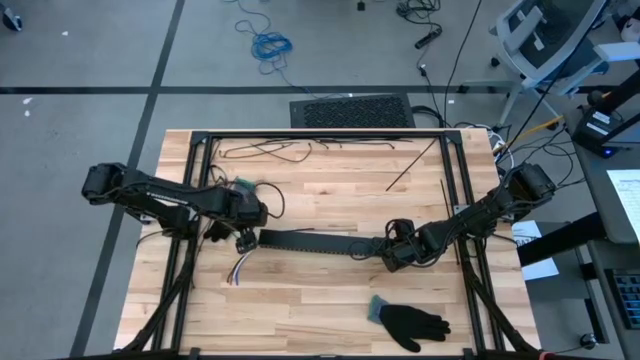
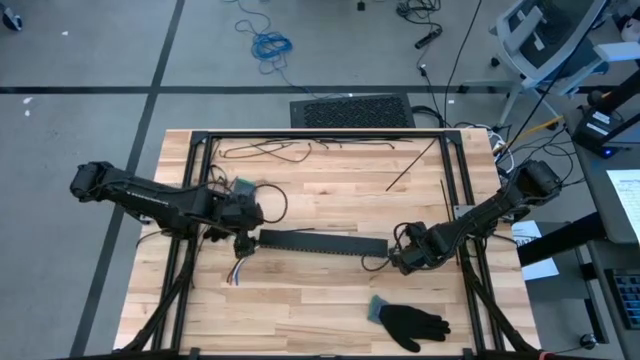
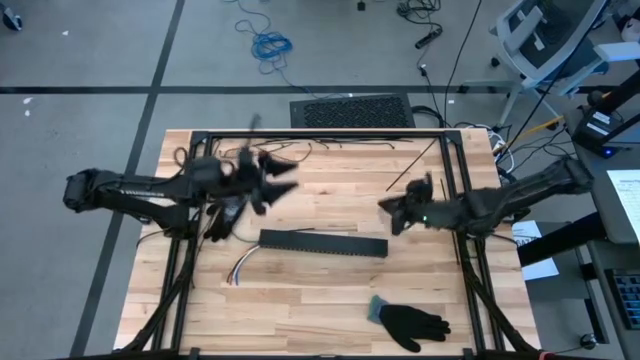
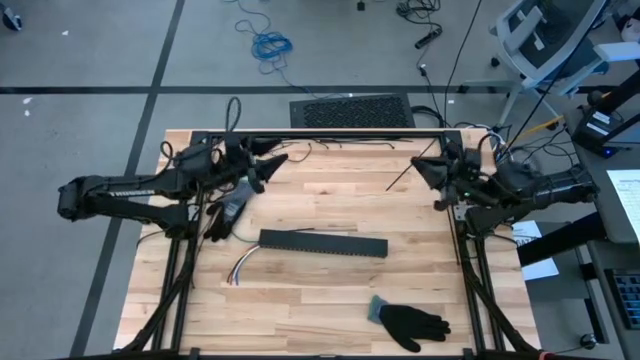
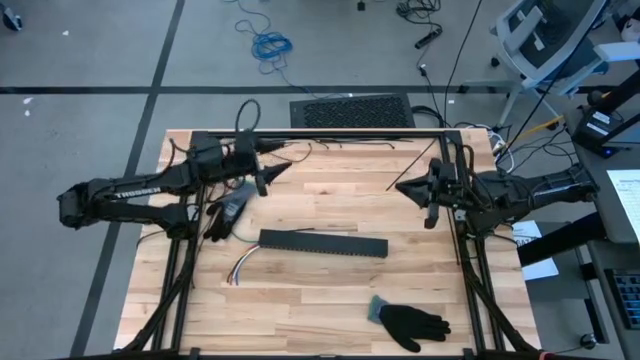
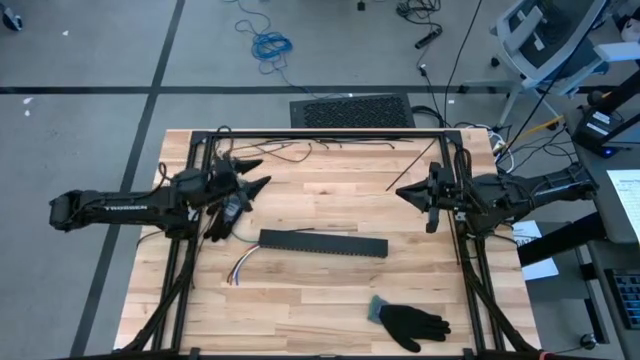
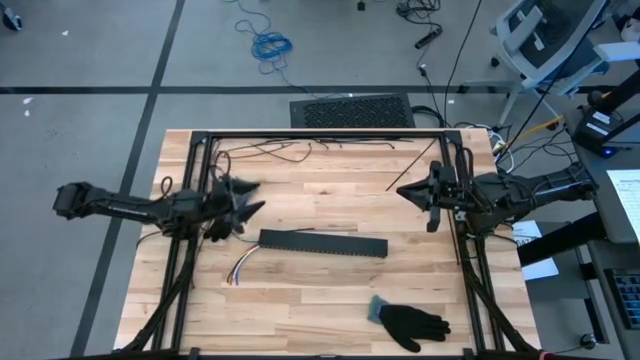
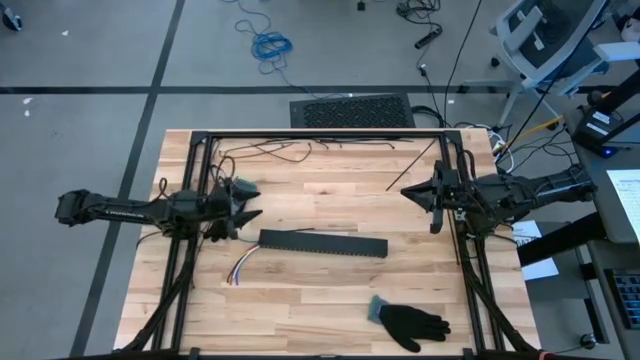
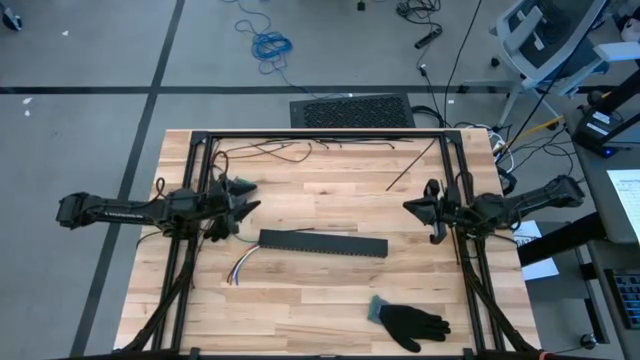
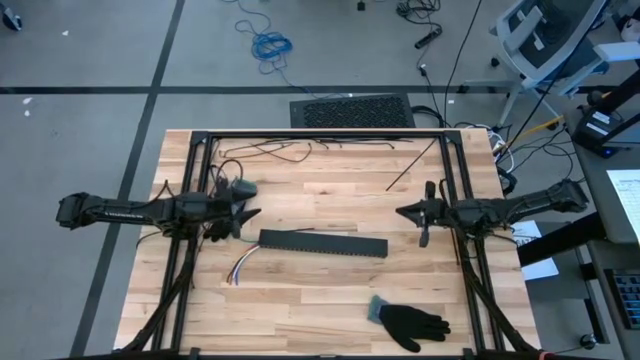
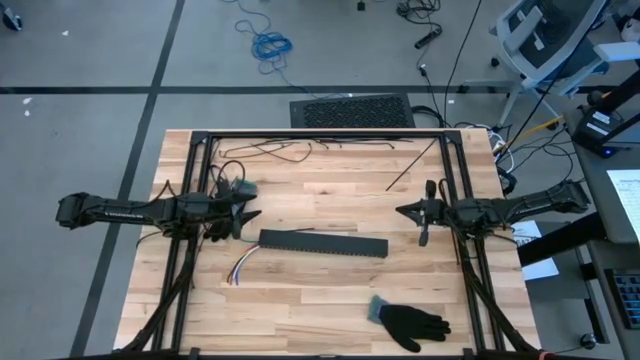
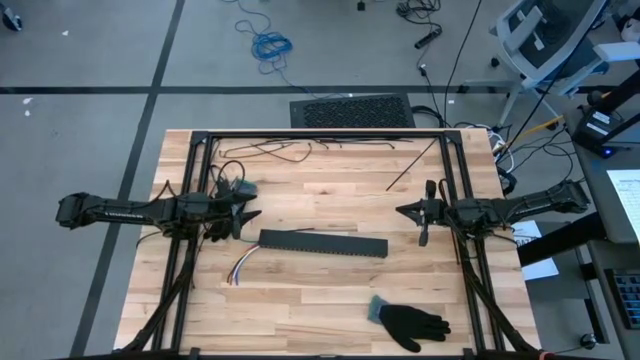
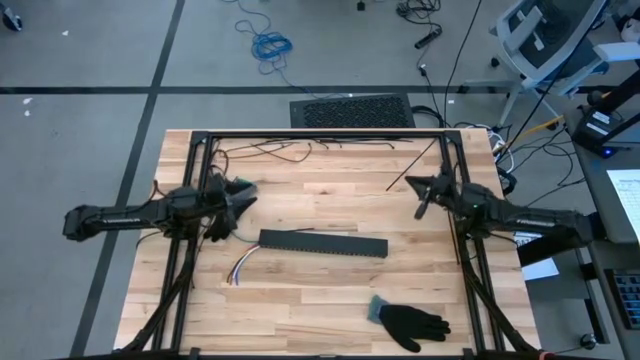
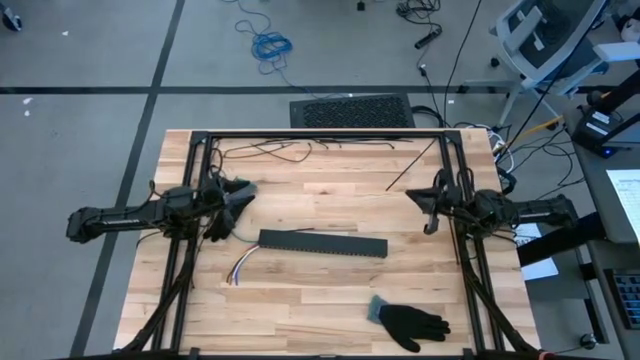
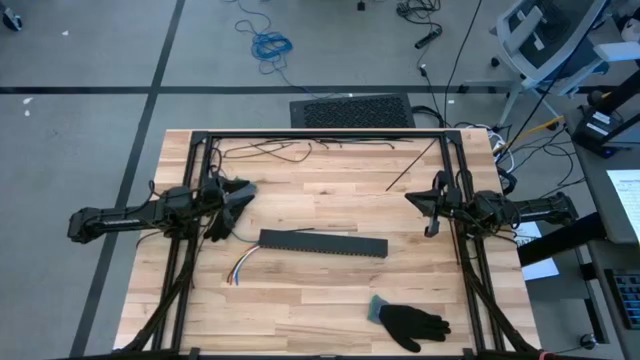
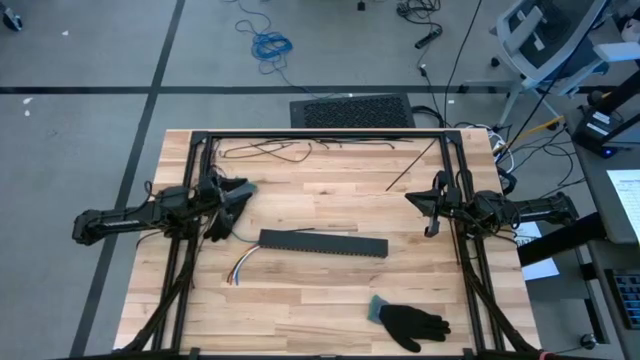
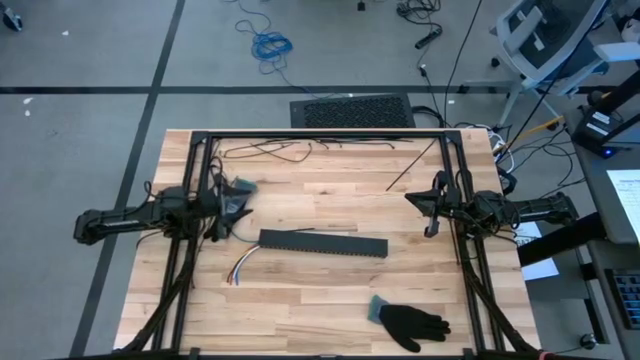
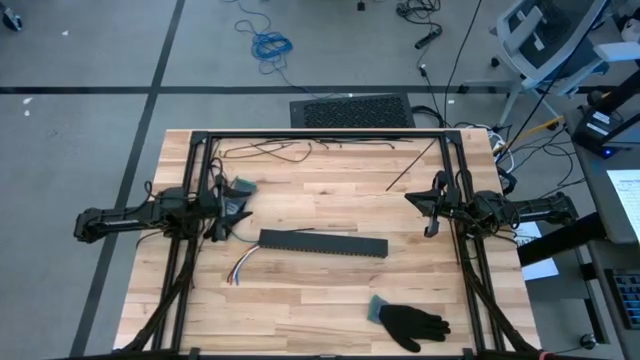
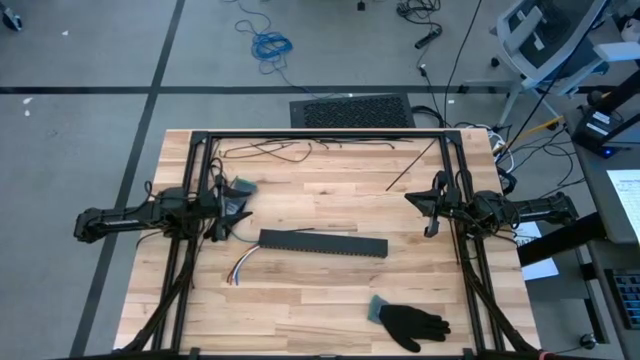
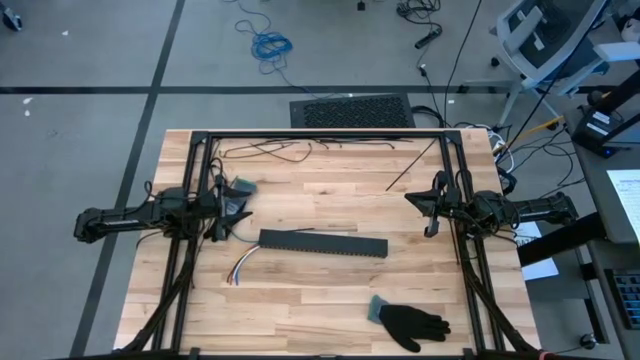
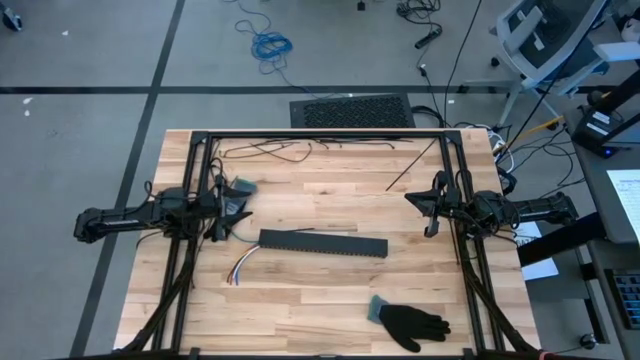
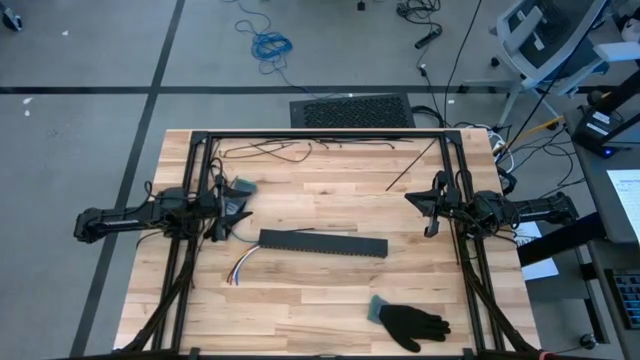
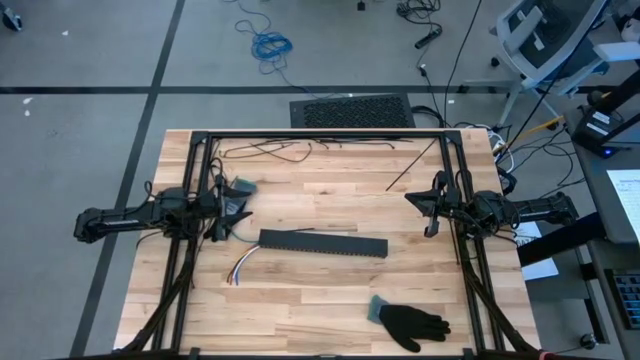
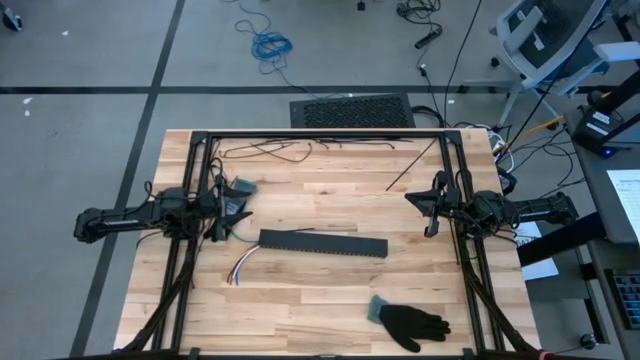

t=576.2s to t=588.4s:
Task: Ziptie cables
Return to Home Position

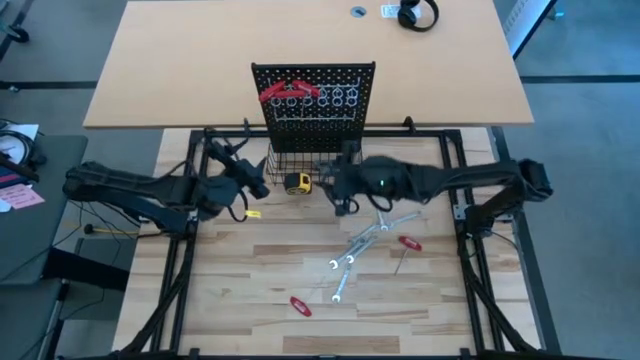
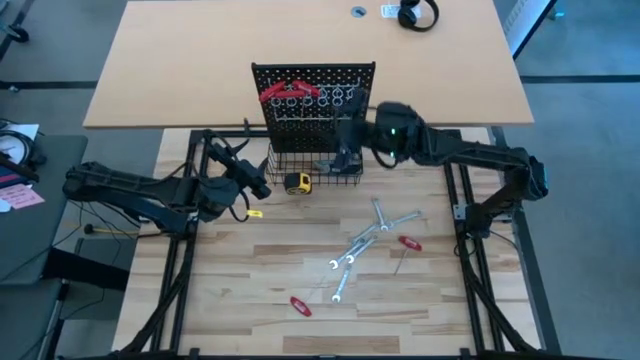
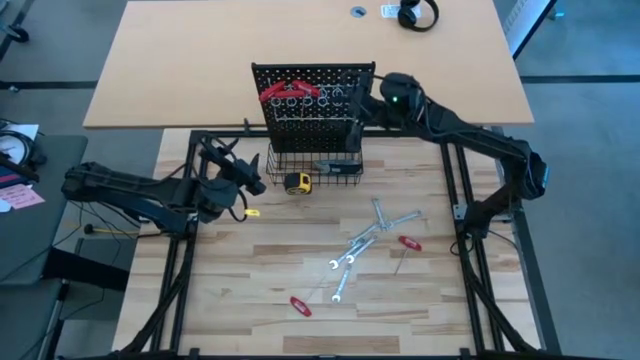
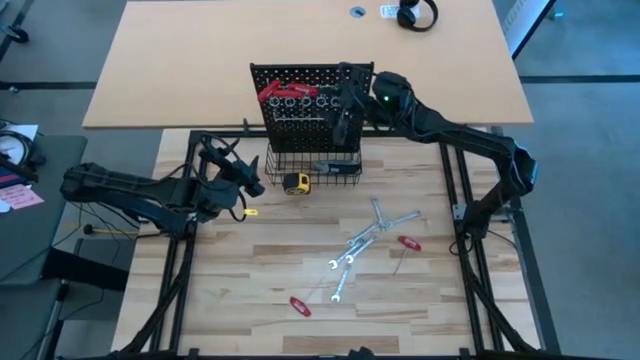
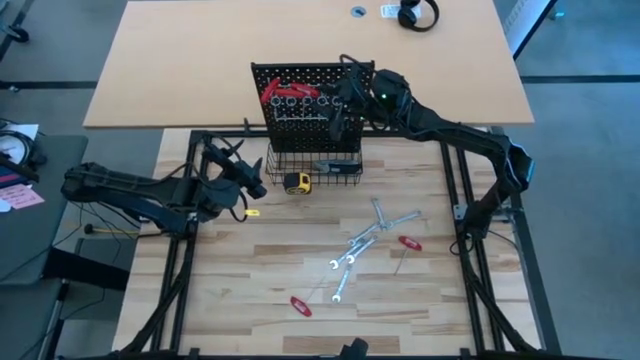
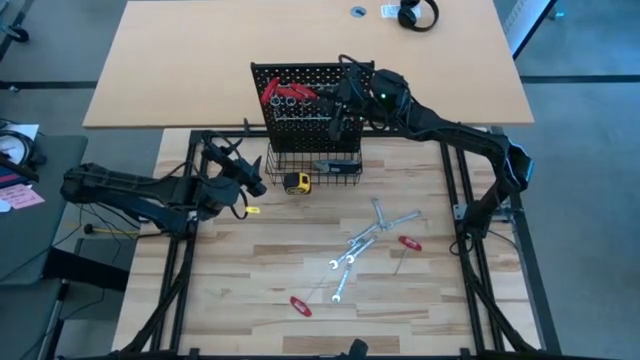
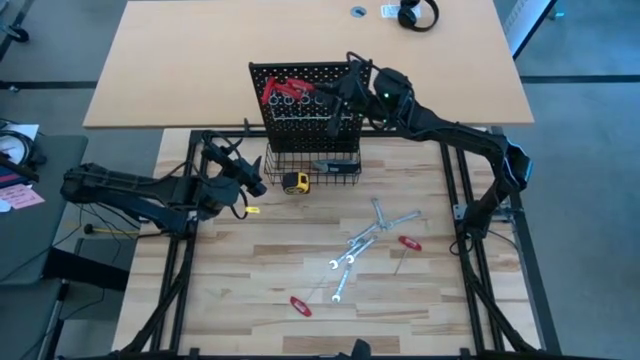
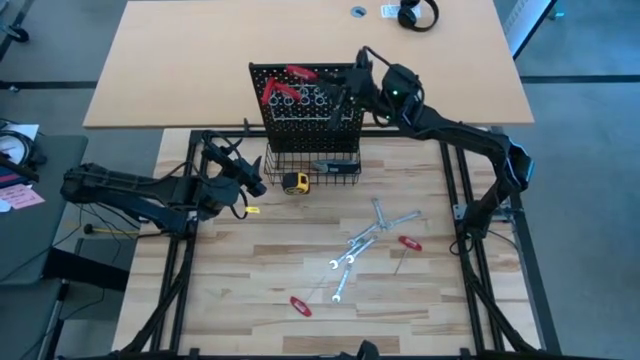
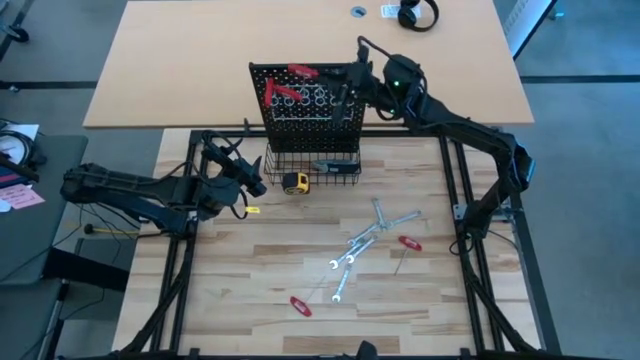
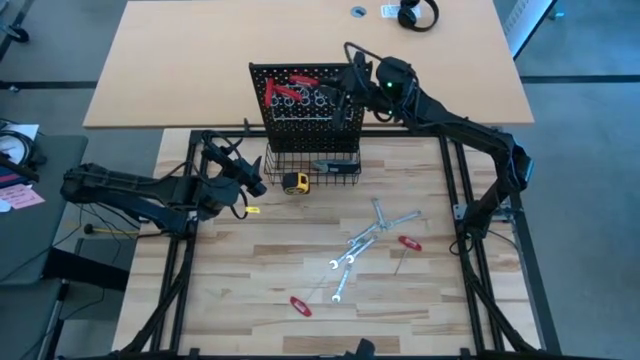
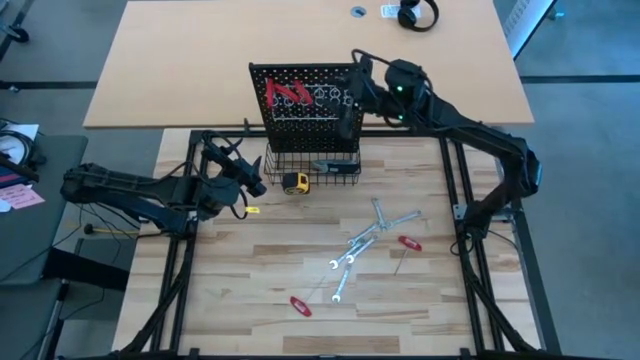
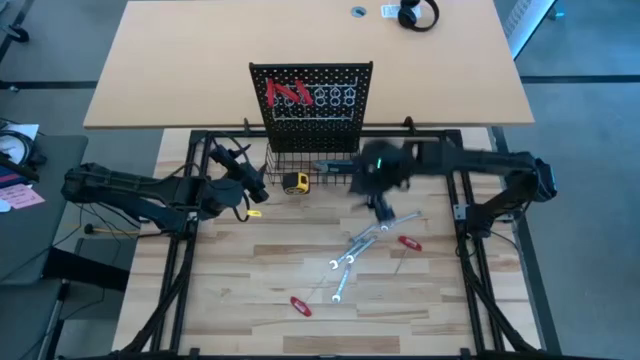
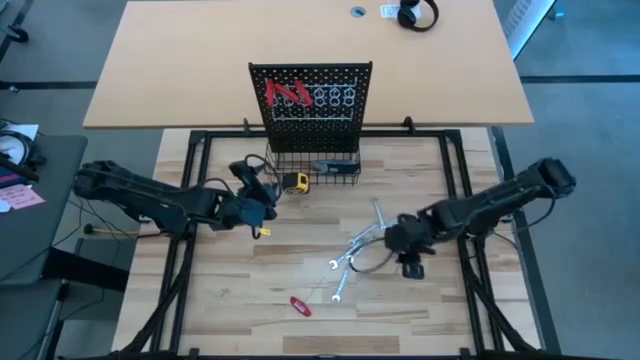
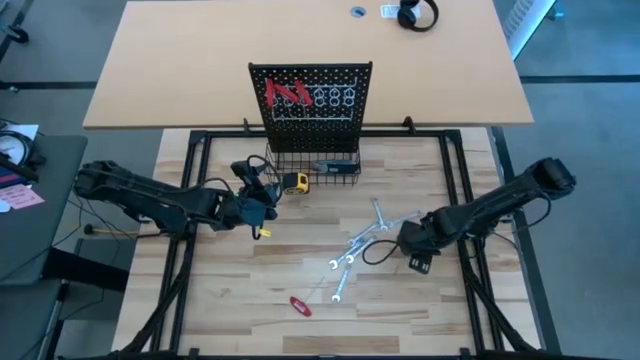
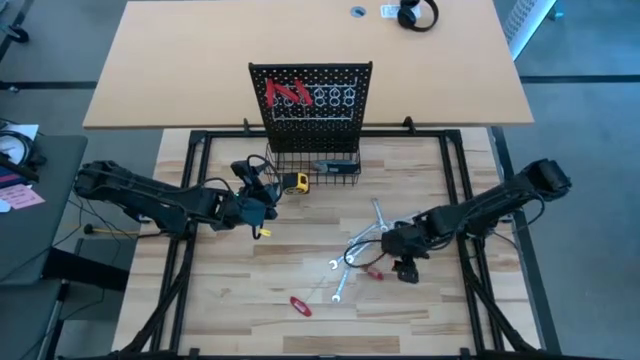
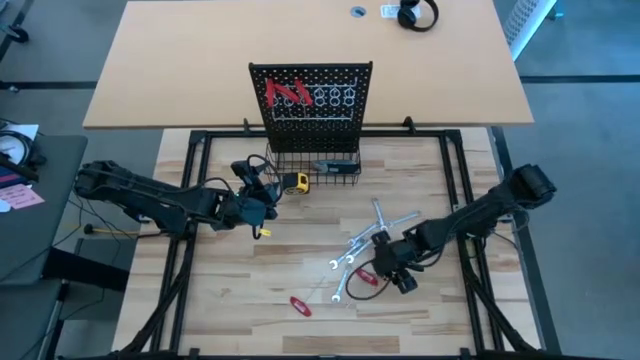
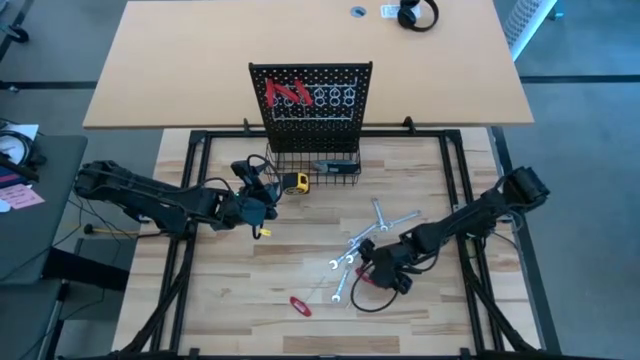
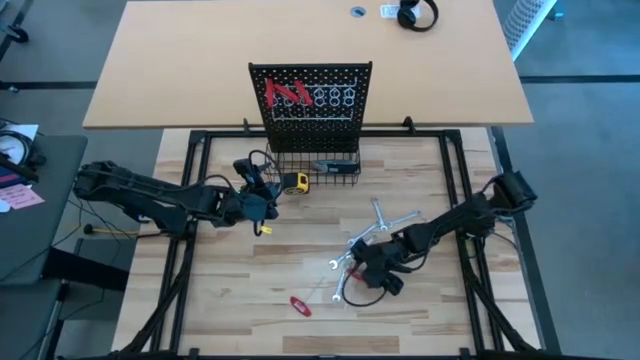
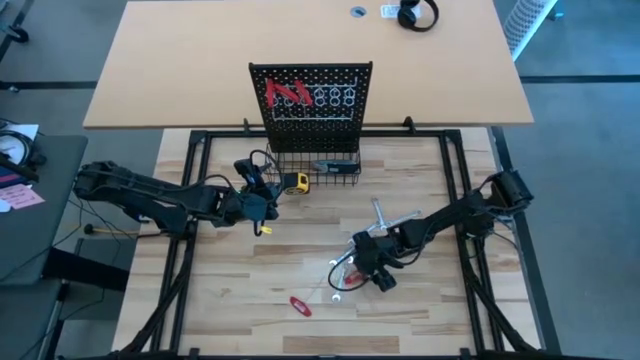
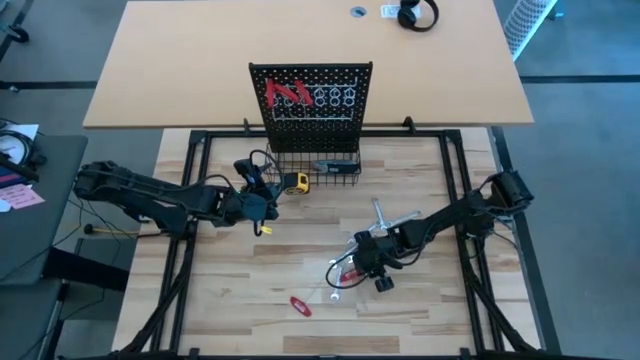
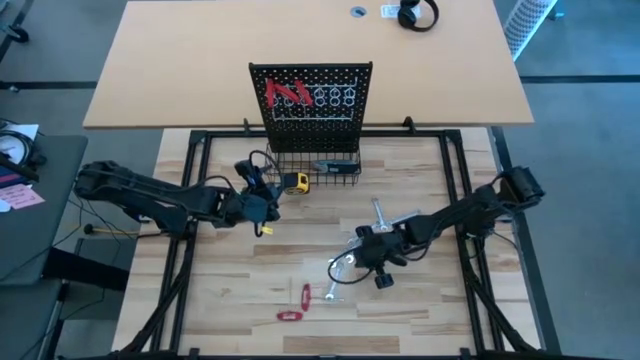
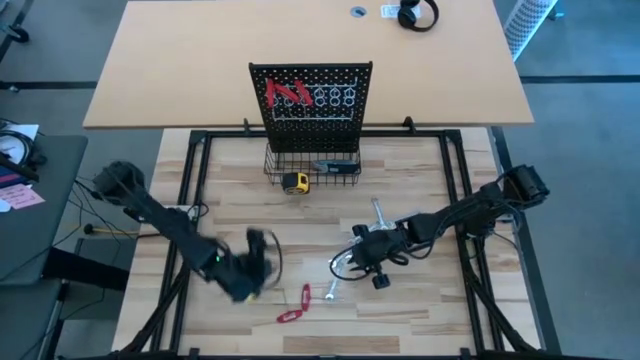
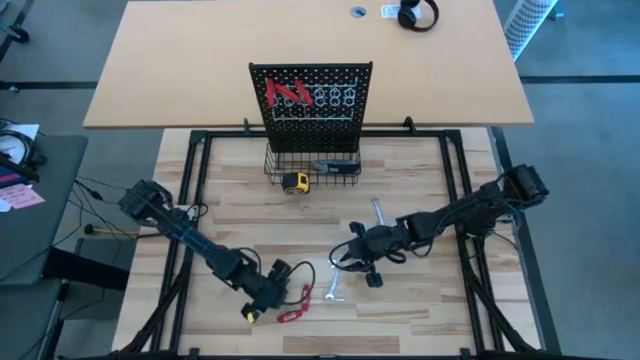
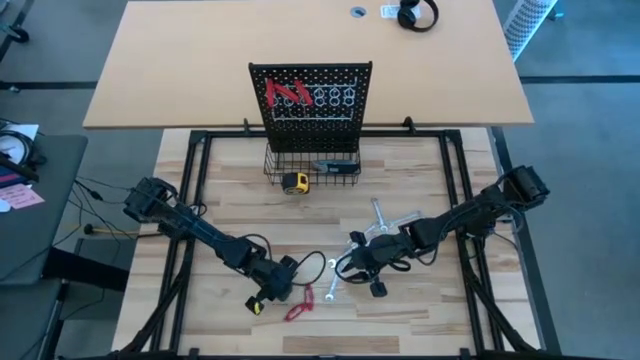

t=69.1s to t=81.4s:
Task: Hang tools onto peg board
Hang the red T-handle Allen wrench into the pegboard
